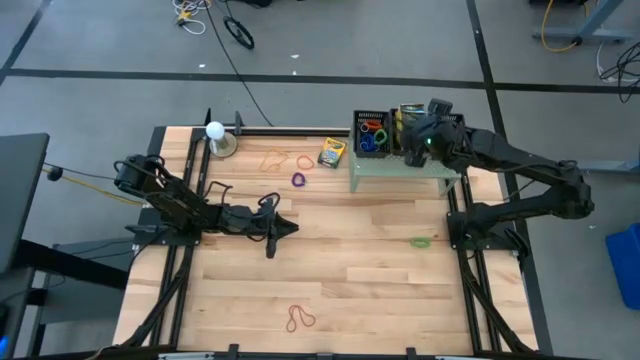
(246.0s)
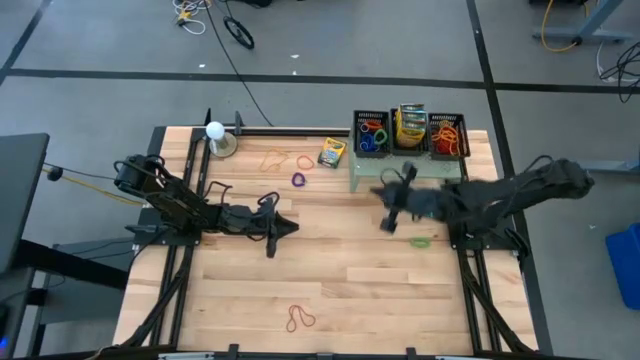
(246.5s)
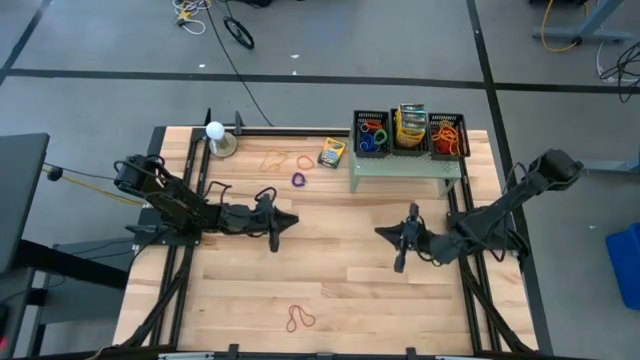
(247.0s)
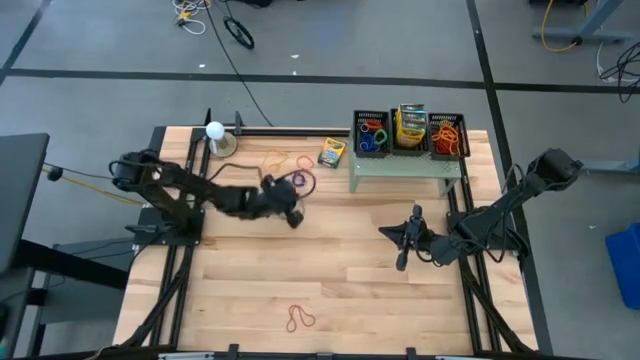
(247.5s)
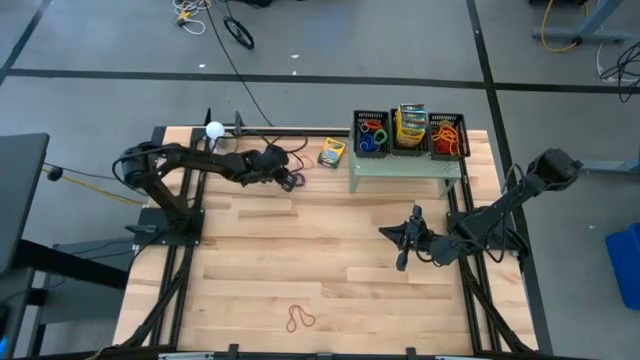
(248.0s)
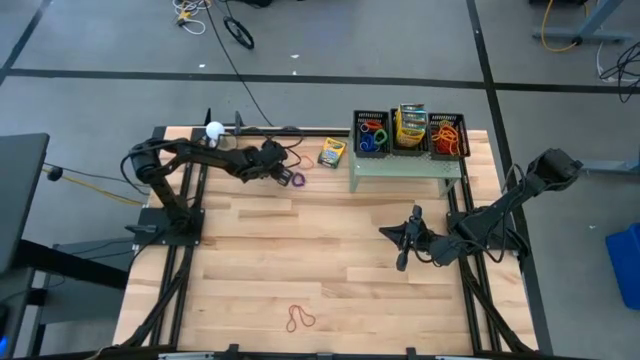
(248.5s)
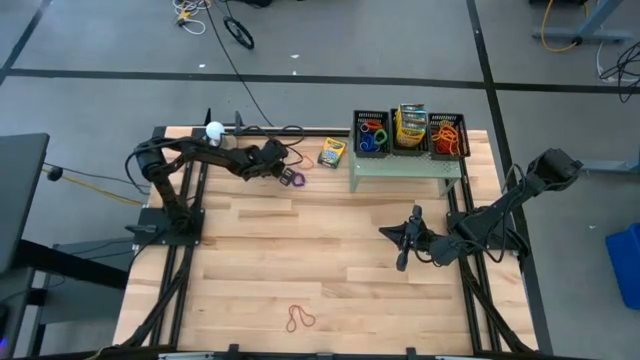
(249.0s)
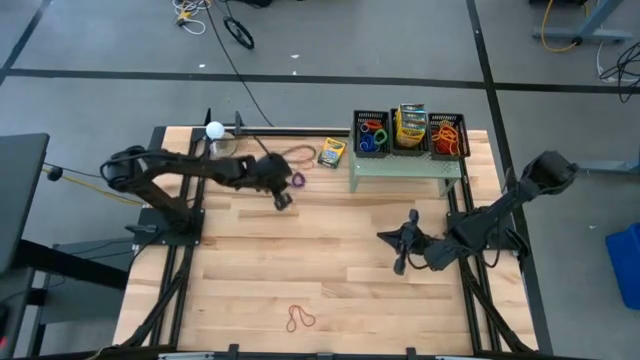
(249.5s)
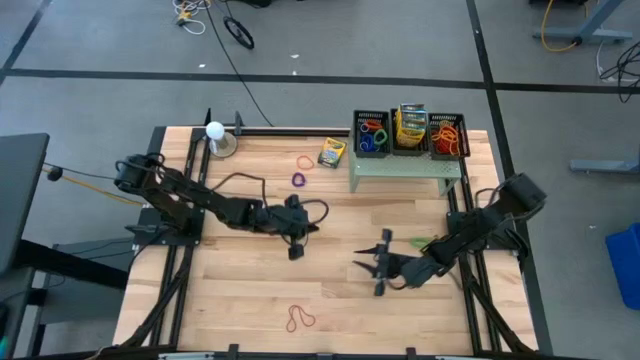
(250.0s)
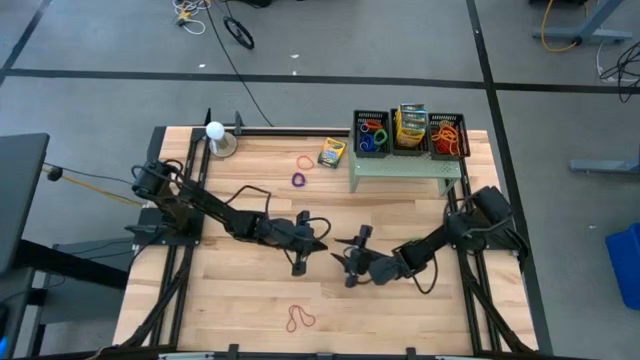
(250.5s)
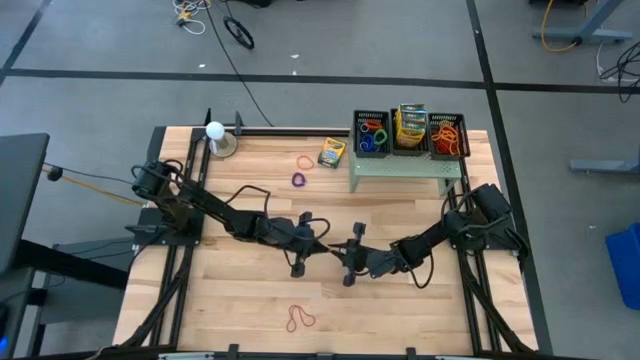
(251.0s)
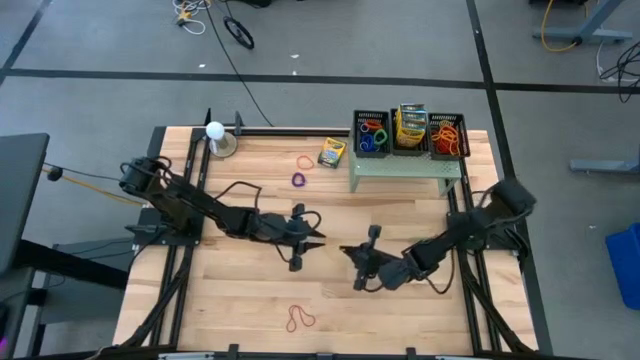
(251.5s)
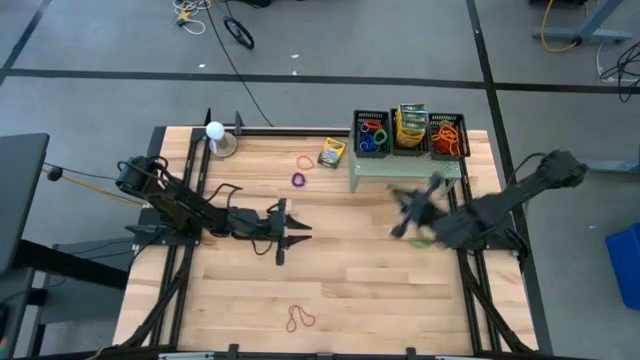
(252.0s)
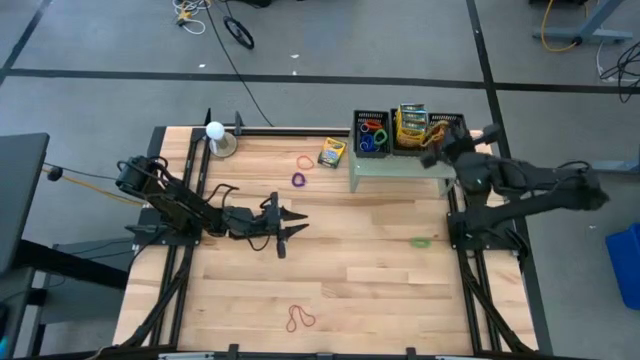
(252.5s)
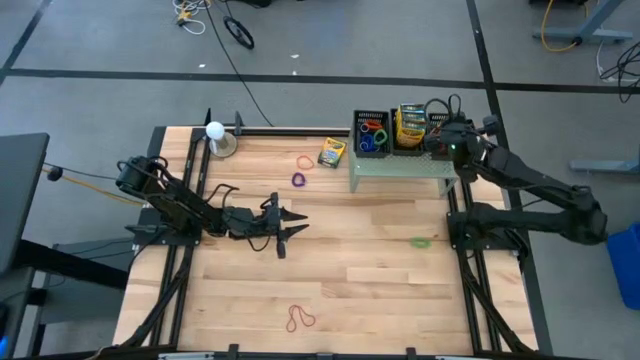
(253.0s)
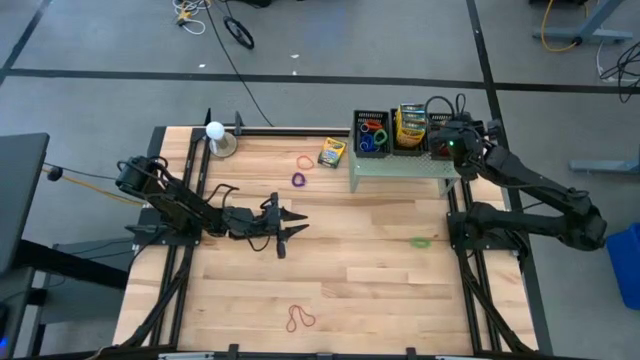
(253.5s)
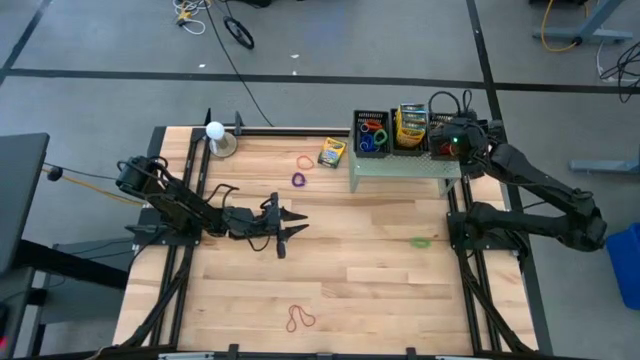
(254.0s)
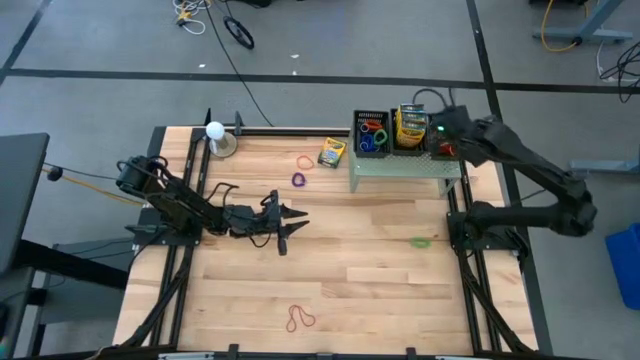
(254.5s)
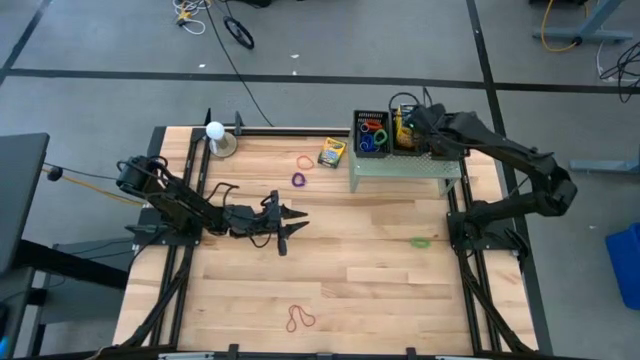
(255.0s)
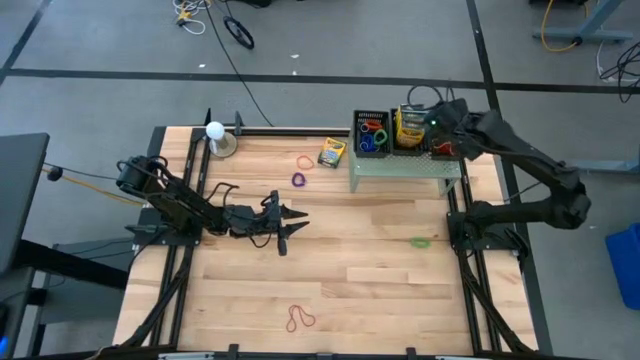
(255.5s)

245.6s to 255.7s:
Task: Pick & Place Office Desk Supplies
Put the yellow rubber band into the right black basket on the shelf

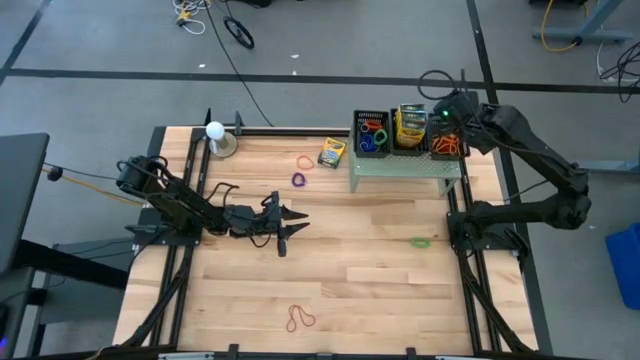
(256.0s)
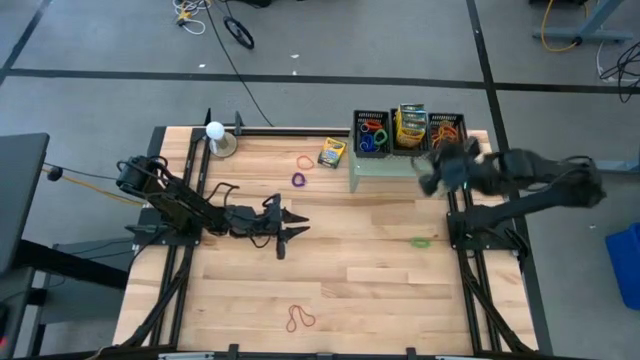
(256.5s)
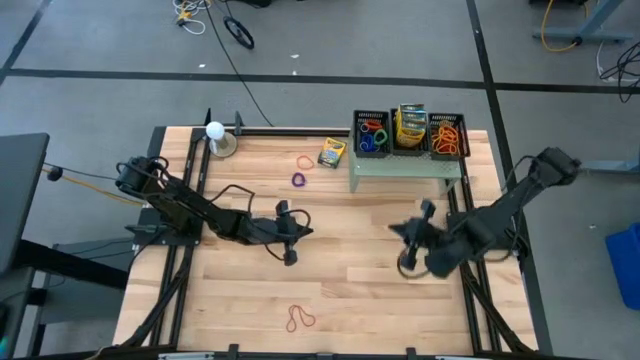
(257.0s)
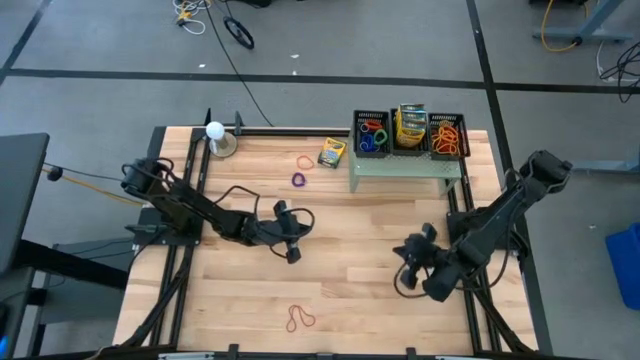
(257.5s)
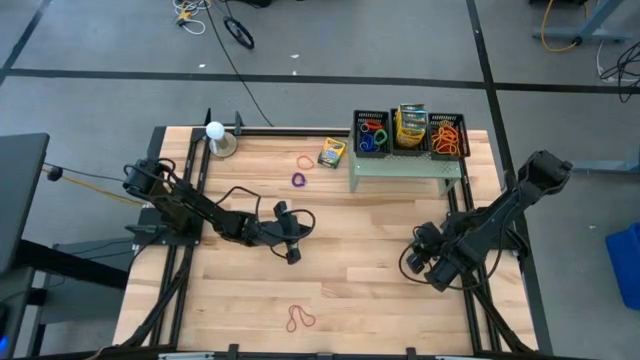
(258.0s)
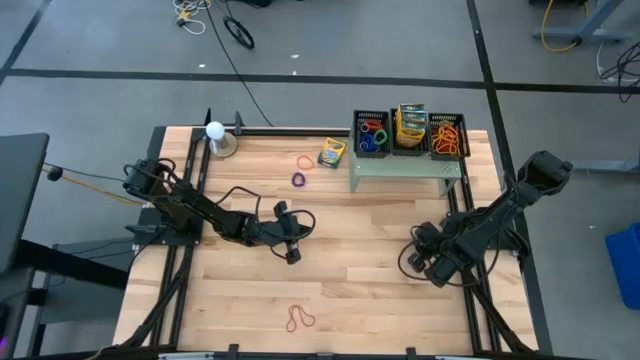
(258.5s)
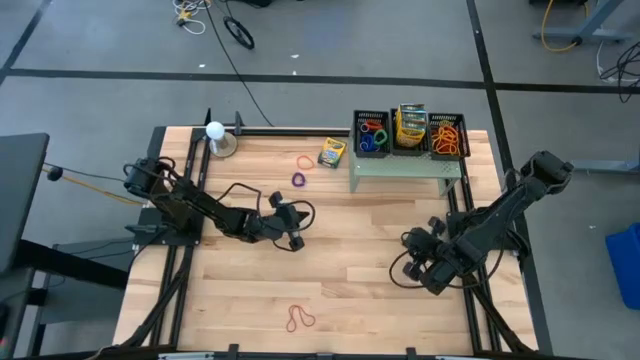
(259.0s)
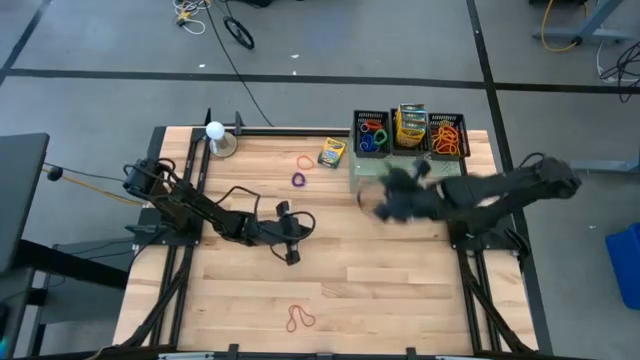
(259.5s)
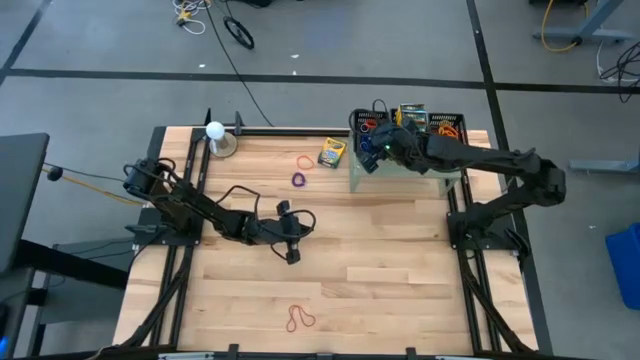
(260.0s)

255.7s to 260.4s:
Put the green spring keychain into the left black basket on the shelf

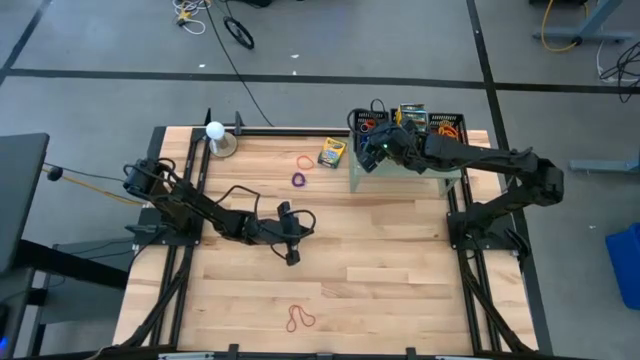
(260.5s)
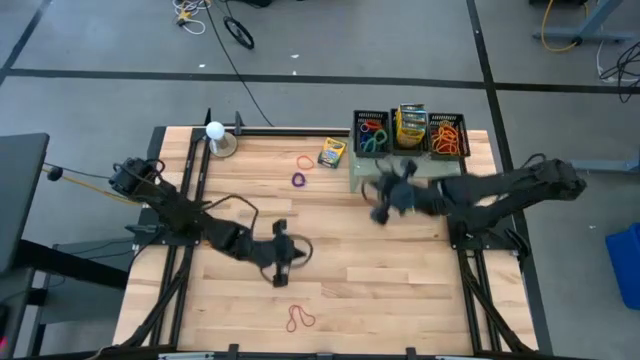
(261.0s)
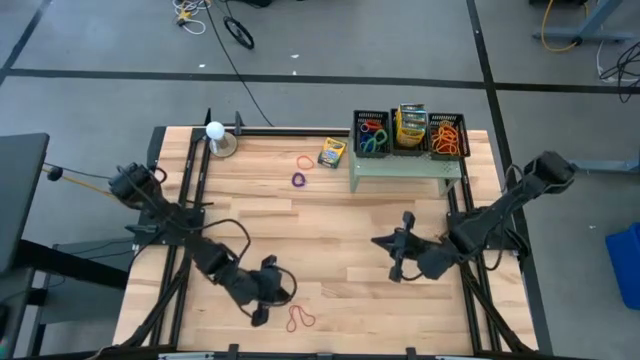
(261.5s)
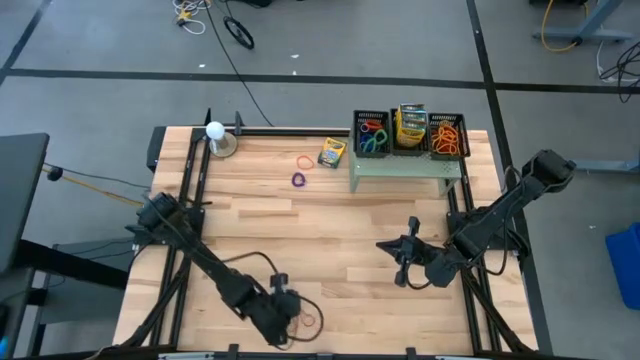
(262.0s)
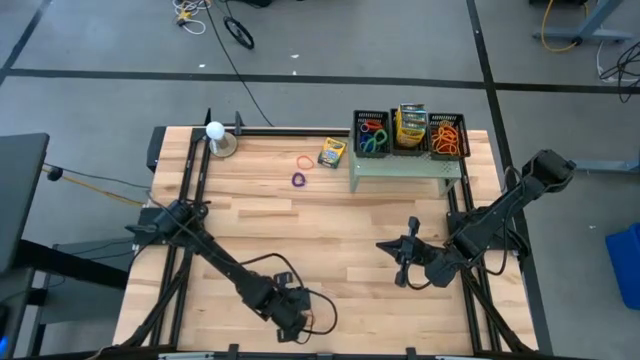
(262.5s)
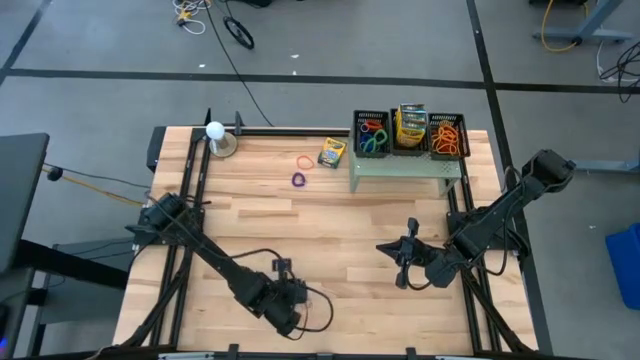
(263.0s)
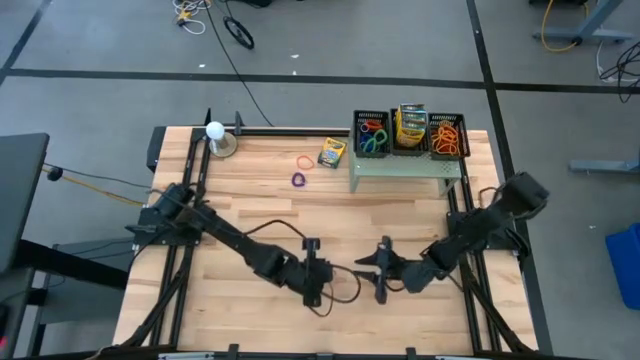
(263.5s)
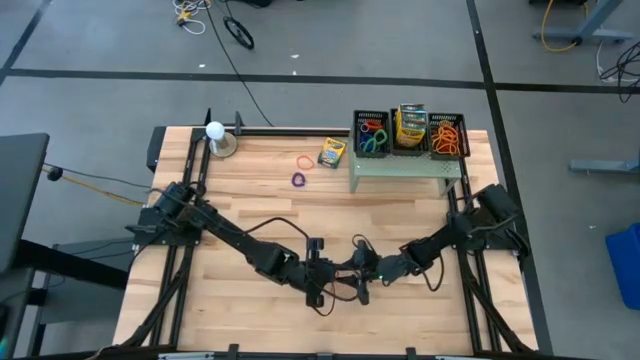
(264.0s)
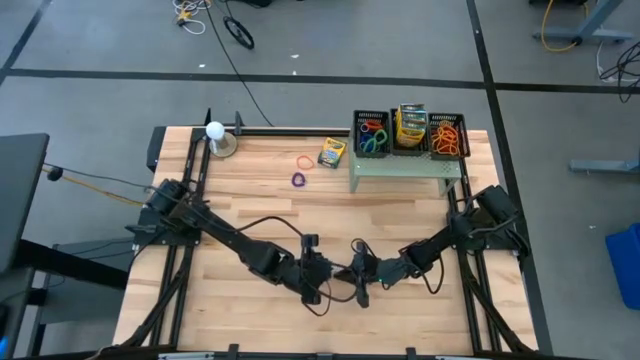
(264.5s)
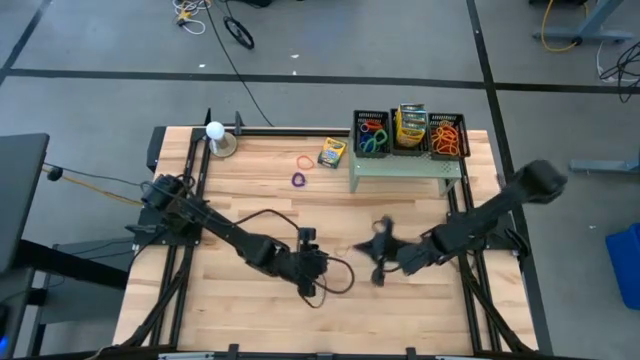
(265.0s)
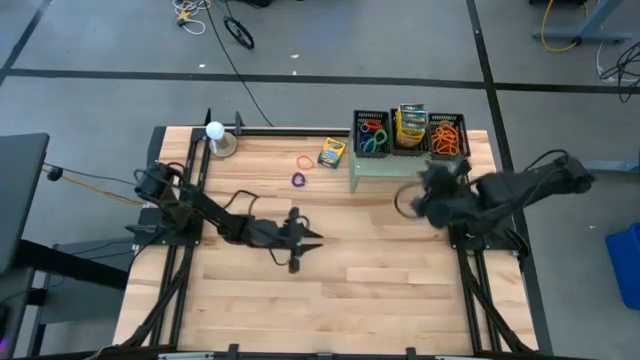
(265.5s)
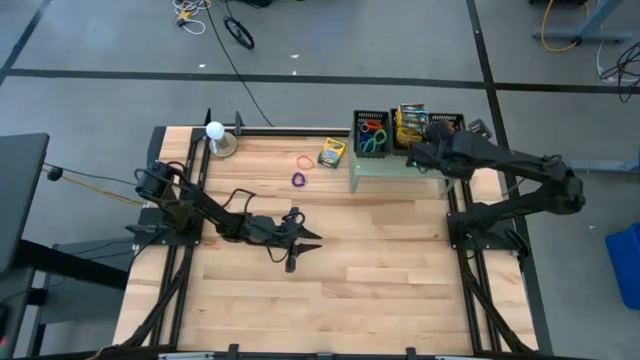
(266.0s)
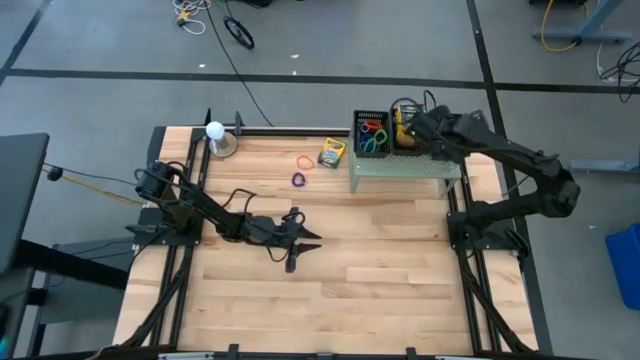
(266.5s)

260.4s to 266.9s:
Put the red rubber band into the right black basket on the shelf

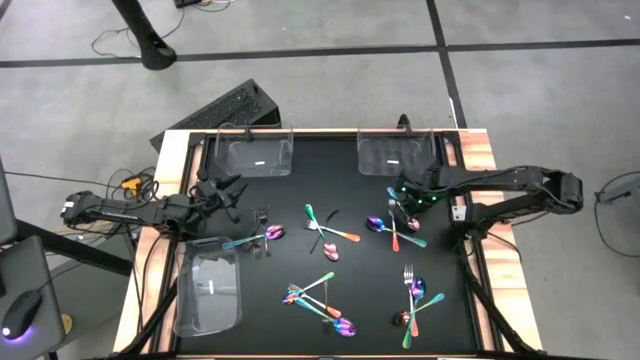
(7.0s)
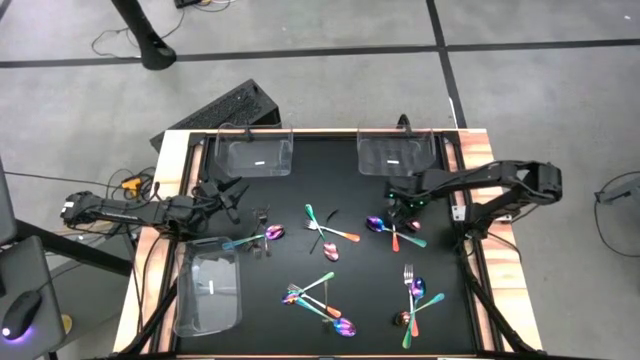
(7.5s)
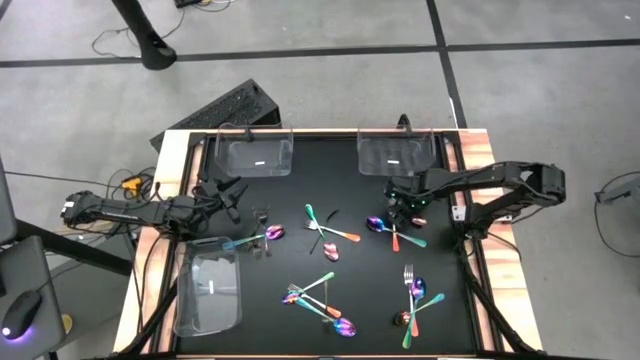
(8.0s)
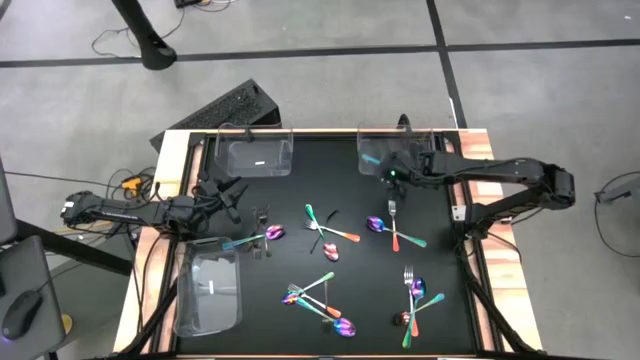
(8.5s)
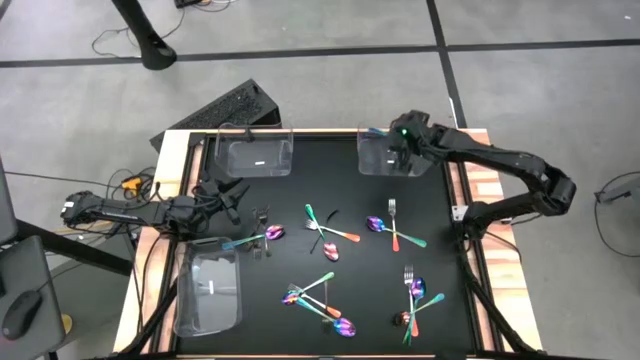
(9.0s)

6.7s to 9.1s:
Task: Sort silverware by color (type)
Put the blue spoon into top right transparent bin
